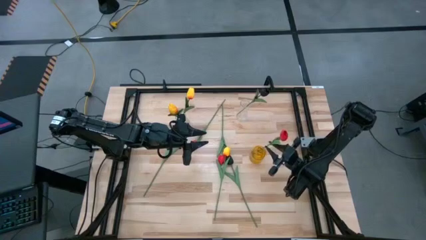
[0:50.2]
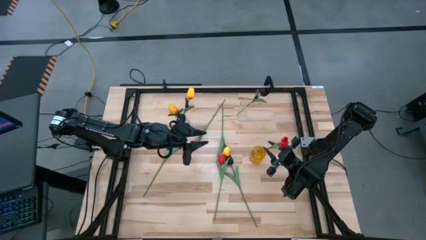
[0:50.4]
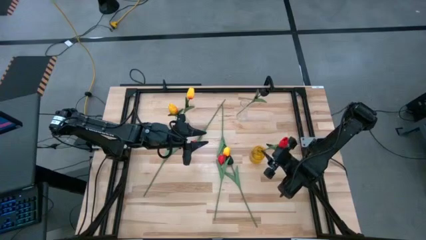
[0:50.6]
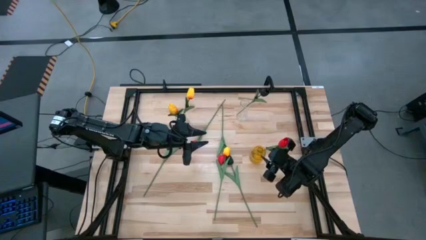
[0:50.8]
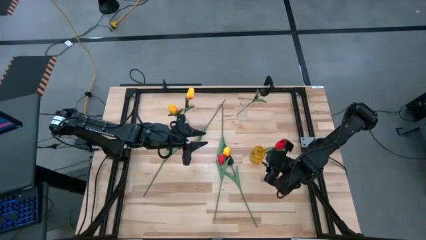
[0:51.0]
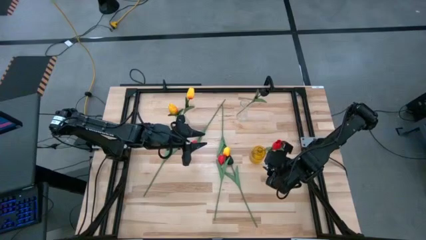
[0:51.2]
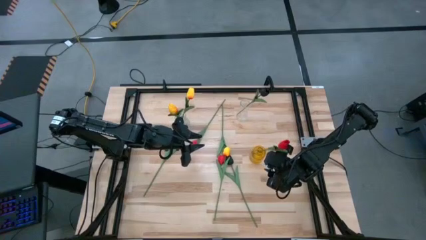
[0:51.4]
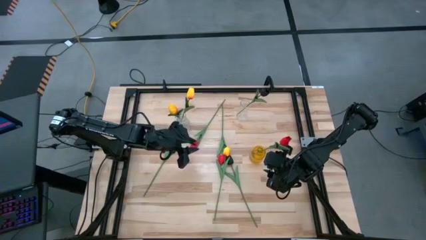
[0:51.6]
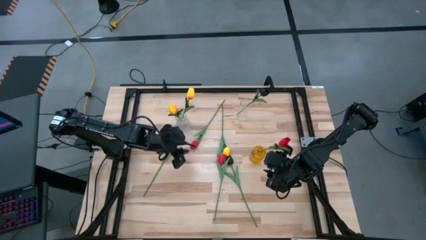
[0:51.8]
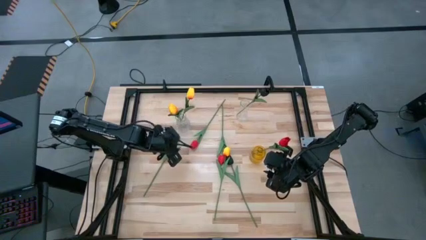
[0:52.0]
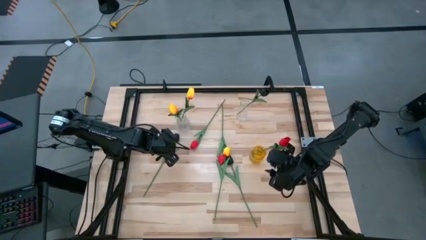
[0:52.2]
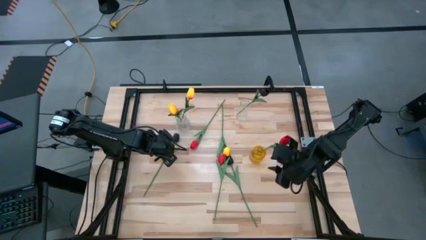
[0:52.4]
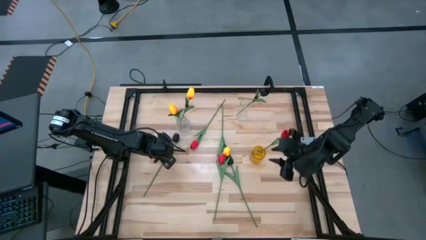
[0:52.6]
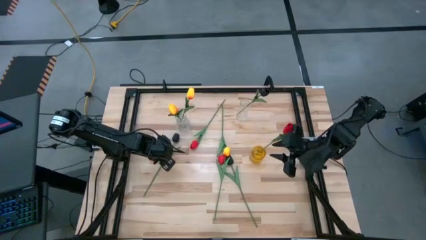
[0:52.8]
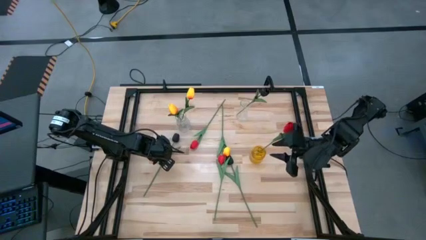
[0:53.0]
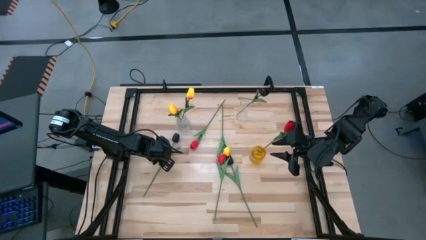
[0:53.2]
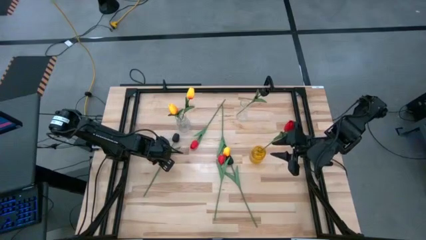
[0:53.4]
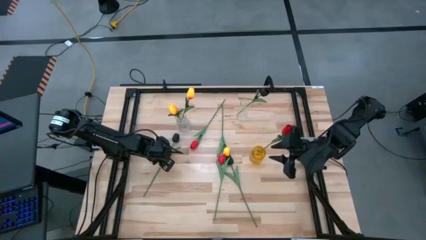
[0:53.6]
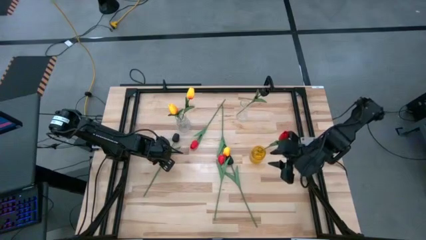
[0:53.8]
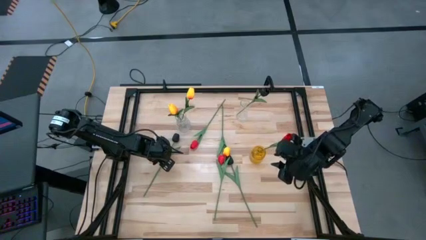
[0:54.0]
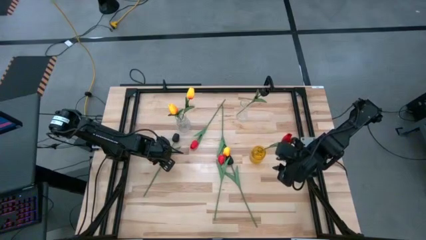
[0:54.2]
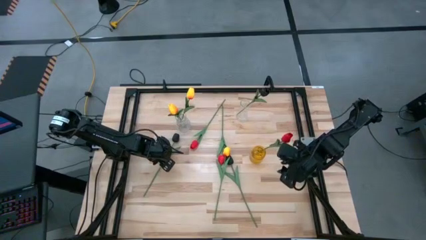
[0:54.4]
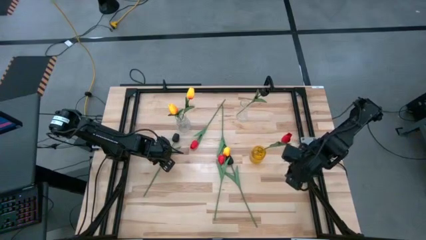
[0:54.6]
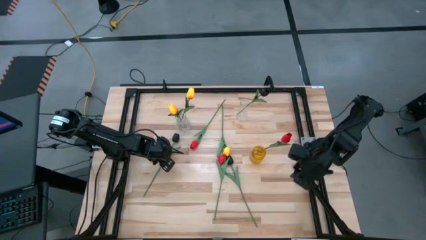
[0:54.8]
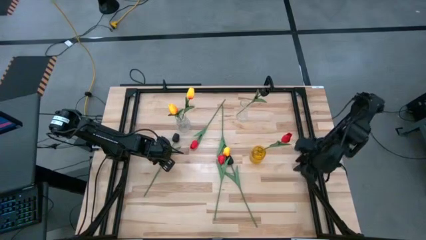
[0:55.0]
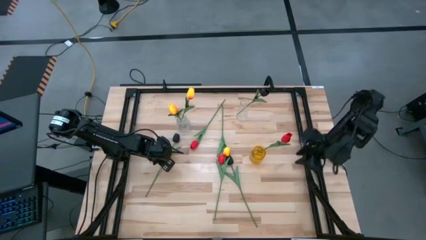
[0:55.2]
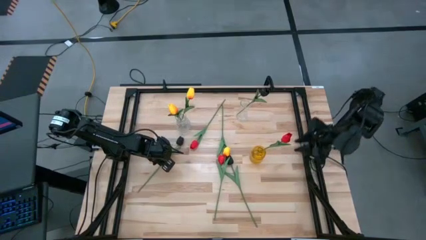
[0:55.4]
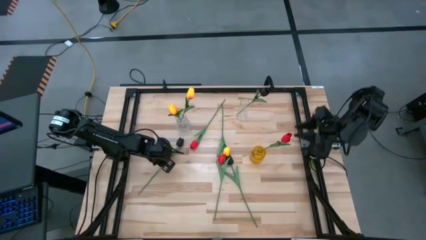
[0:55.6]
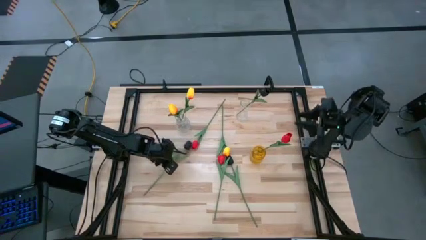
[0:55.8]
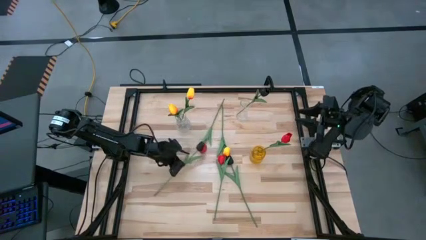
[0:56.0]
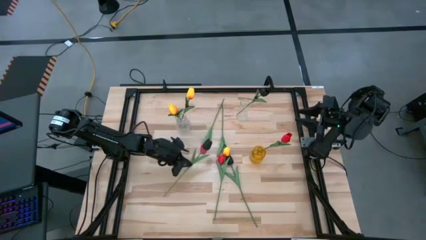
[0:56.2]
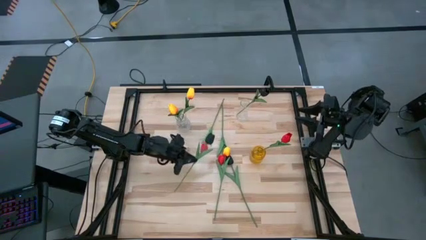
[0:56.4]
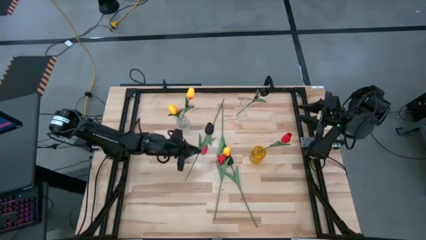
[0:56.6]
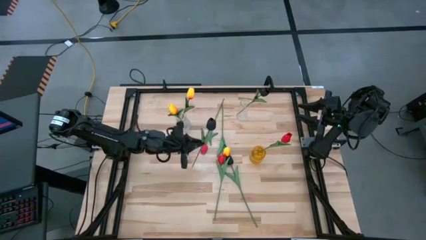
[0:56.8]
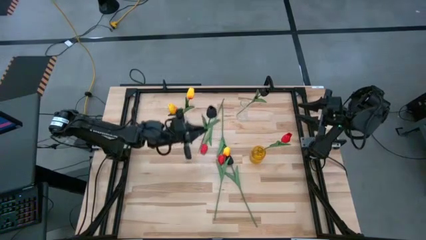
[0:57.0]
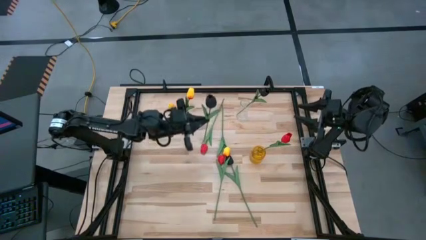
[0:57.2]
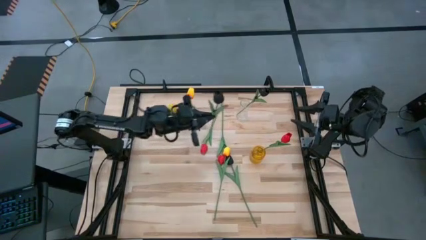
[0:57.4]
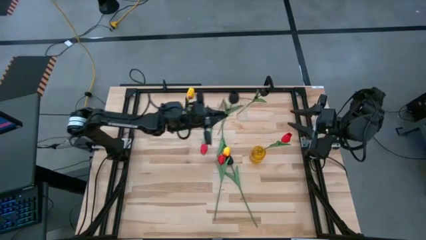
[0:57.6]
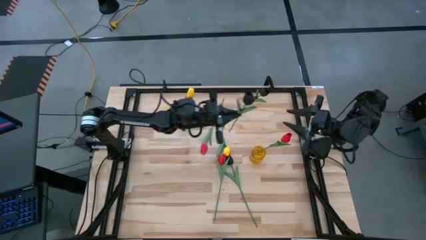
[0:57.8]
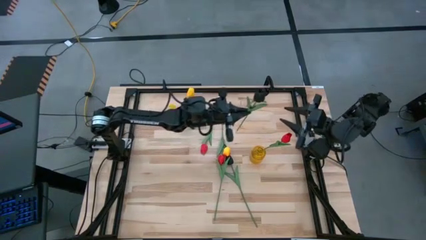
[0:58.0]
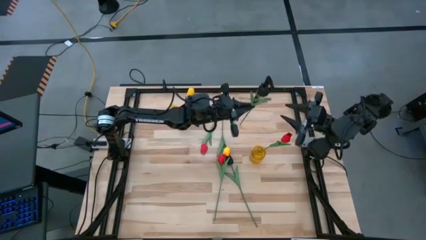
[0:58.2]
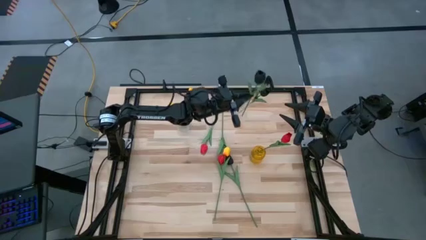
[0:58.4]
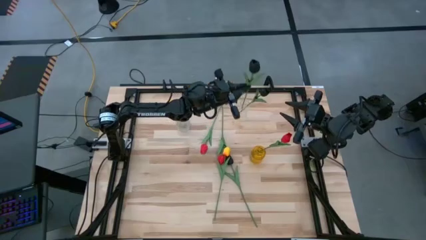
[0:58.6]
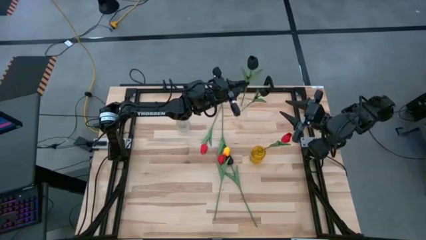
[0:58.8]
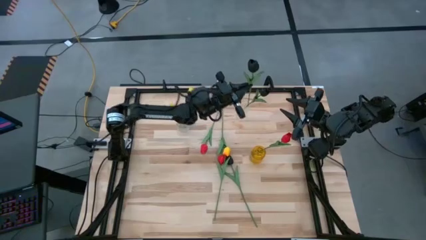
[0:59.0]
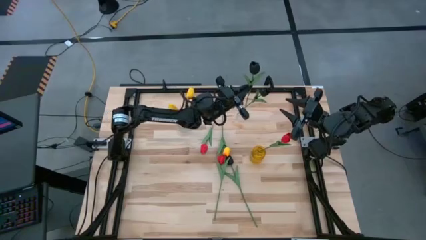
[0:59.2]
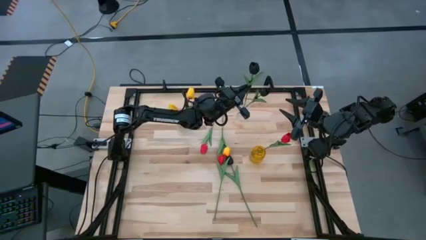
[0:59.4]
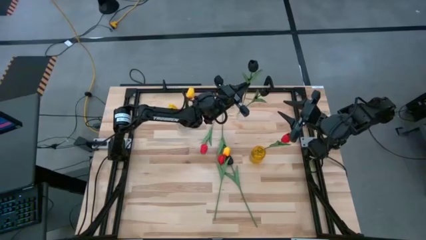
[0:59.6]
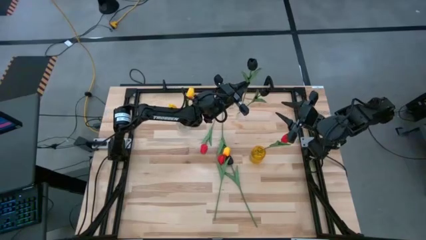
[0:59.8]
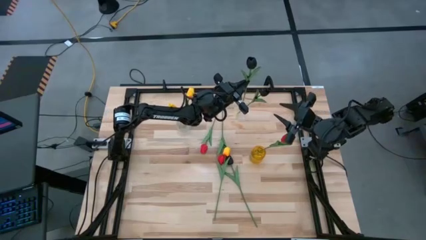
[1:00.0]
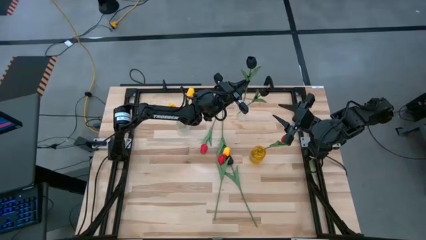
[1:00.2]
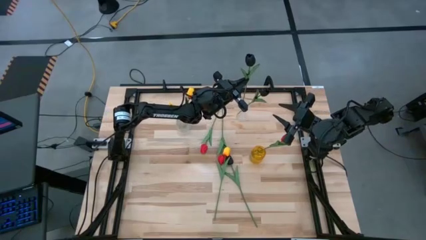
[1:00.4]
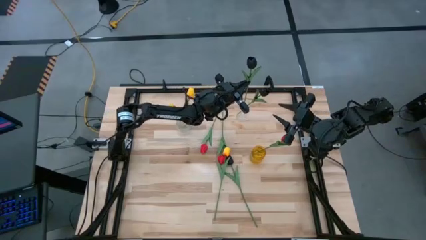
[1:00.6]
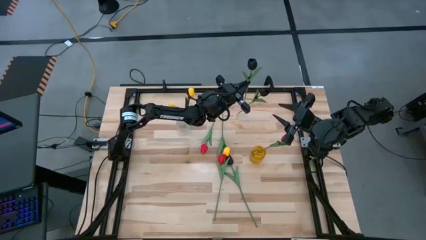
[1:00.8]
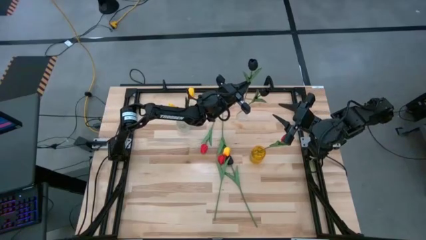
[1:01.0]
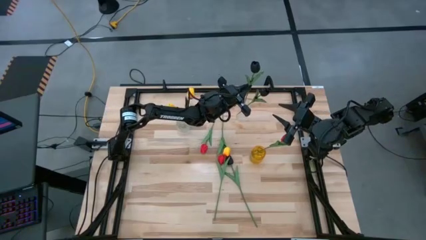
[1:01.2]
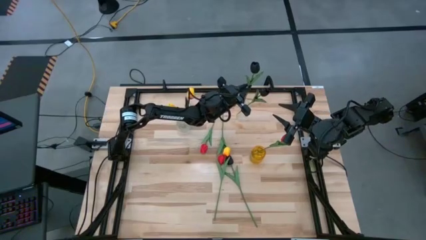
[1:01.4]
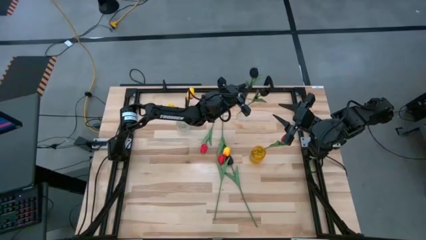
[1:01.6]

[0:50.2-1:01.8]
Task: Sort flowers into vase by color
Put the left black tulip into the right transparent vase
